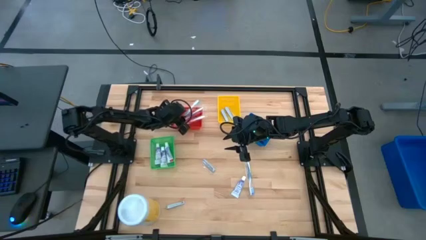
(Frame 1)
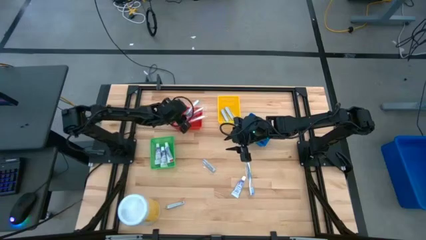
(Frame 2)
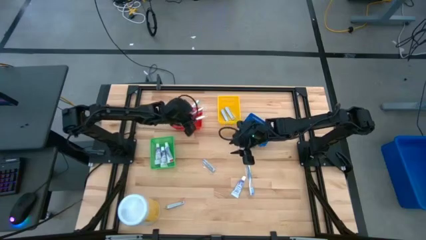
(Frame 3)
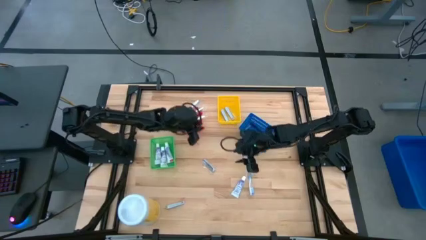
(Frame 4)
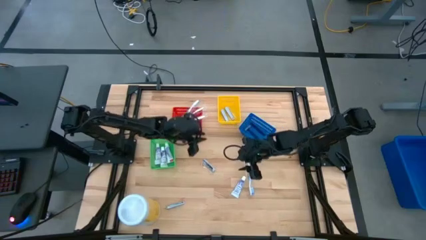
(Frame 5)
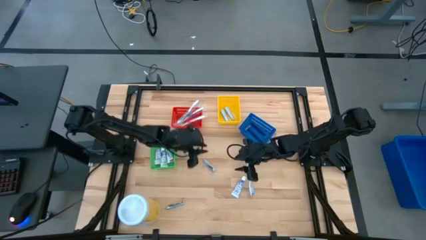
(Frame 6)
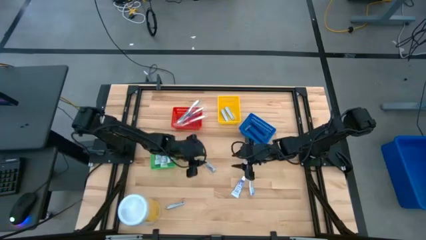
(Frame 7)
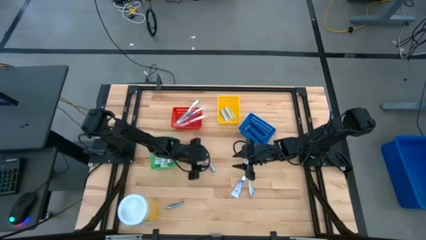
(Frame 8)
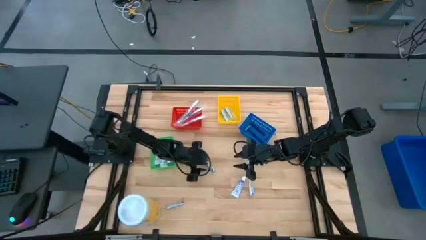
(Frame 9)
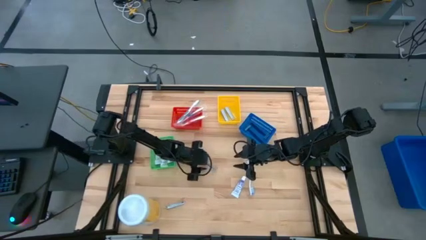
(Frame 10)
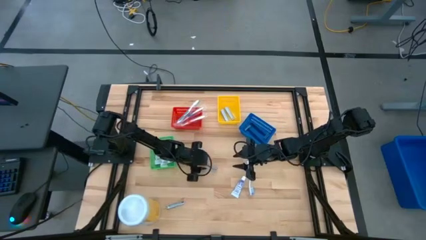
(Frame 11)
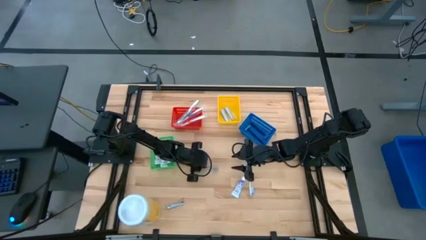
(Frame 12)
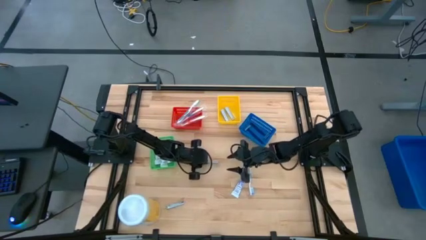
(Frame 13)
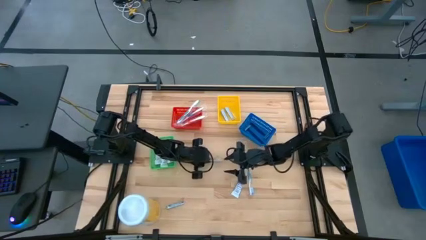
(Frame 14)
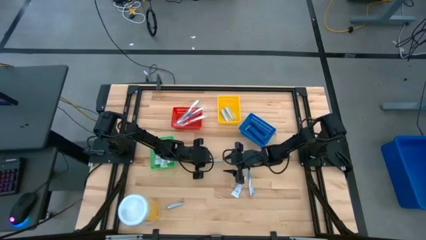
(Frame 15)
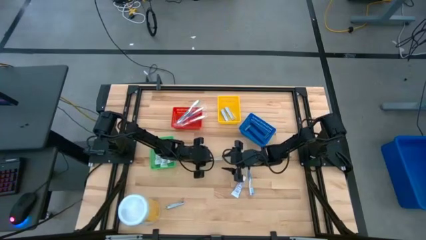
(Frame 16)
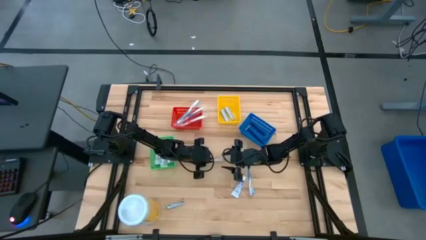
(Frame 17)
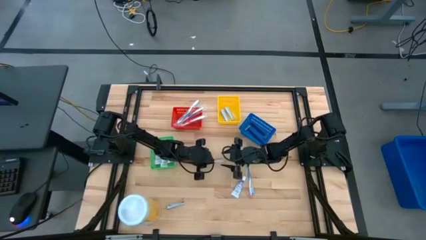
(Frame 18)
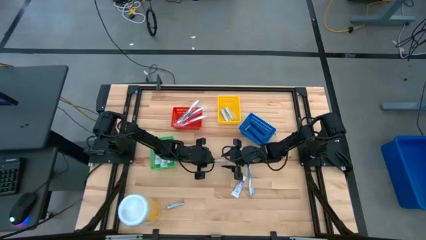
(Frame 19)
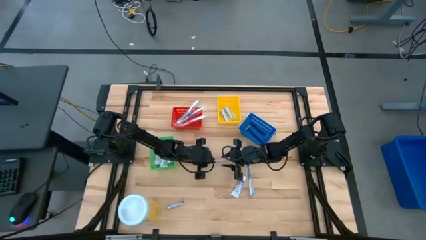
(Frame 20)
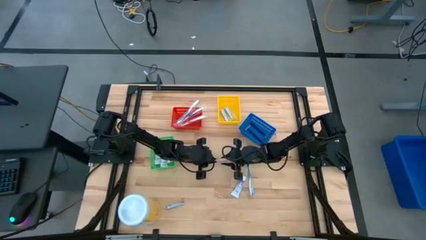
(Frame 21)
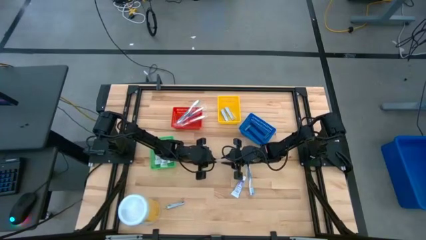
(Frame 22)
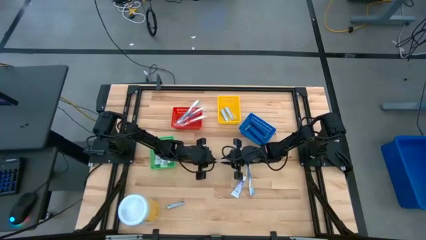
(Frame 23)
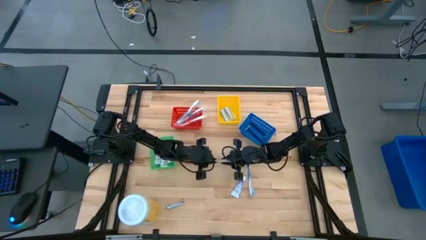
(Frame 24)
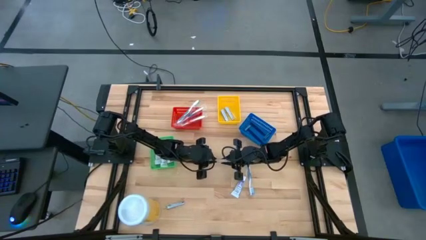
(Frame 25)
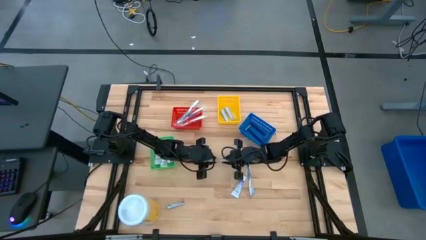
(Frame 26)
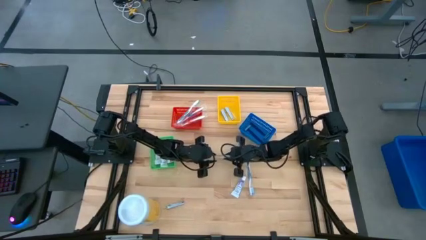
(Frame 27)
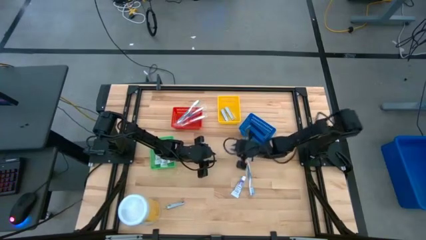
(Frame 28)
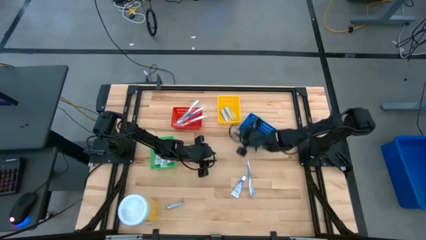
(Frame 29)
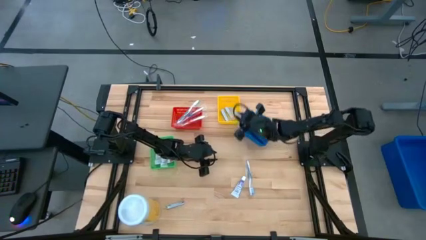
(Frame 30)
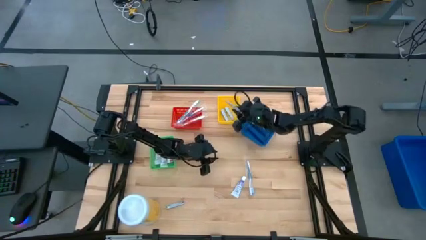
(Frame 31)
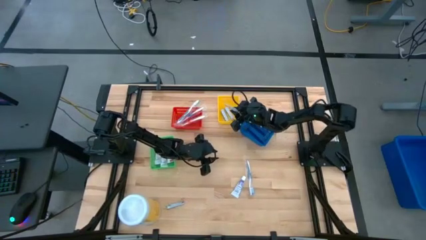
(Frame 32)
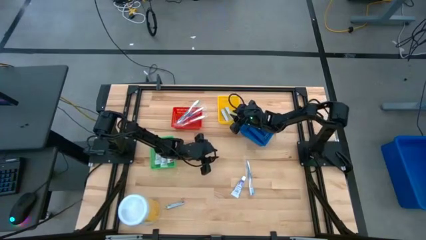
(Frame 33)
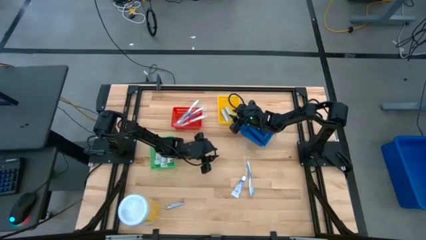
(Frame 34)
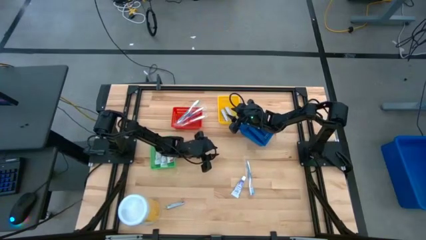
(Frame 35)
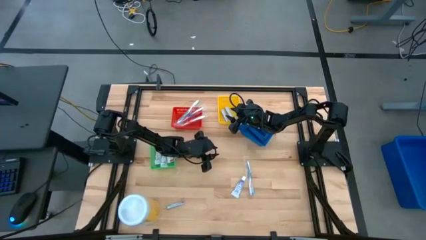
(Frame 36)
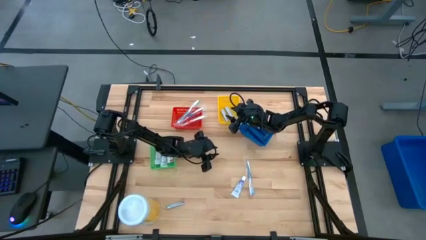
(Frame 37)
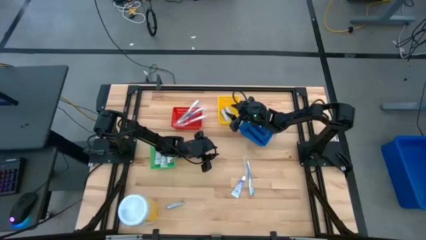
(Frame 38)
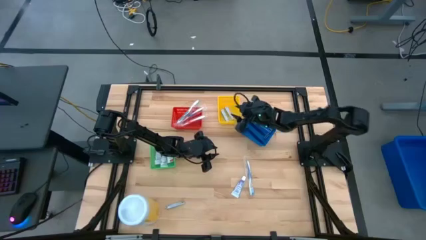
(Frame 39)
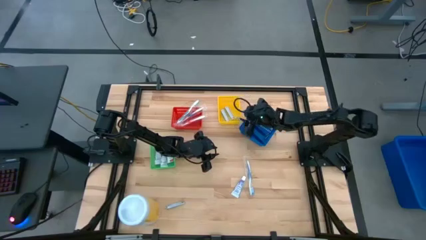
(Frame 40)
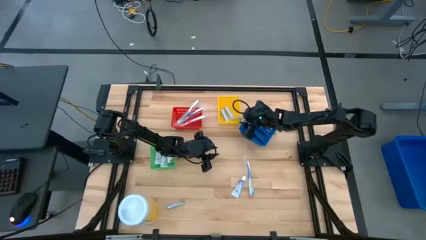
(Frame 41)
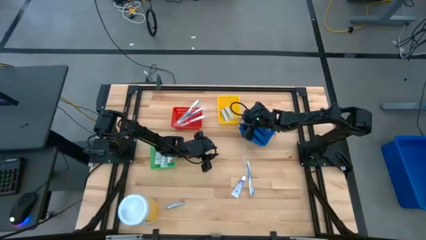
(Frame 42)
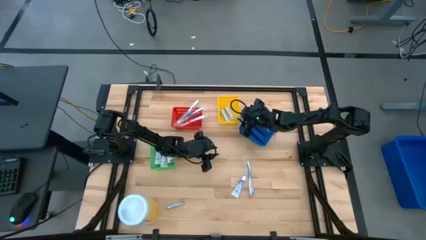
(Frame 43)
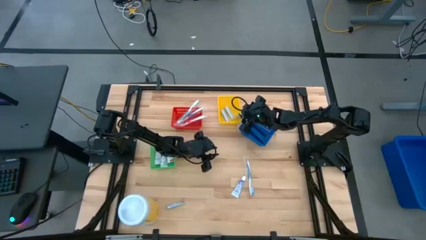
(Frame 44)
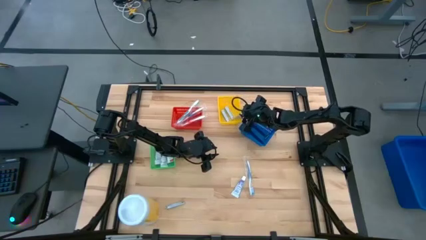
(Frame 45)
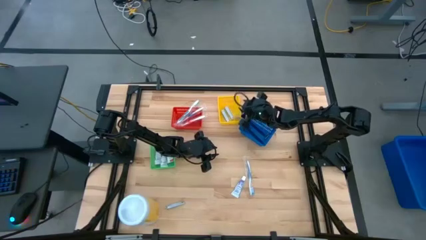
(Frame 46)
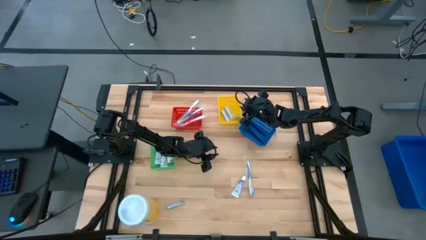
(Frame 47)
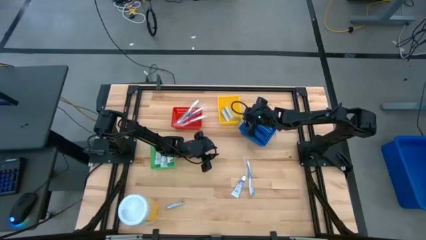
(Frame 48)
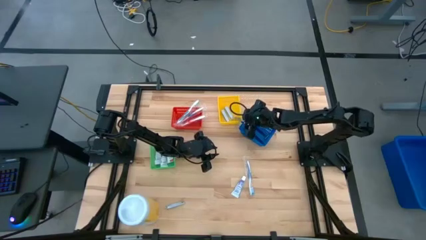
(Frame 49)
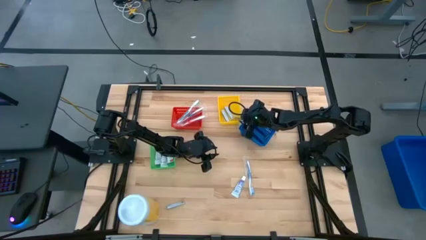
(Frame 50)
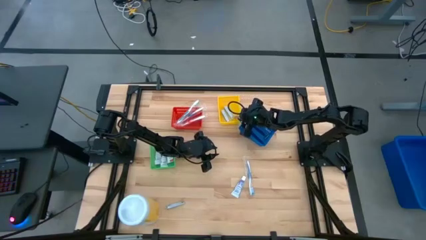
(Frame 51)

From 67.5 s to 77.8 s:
Task: Pick & Place Travel size toiletries
Put the silver nail cutter into the yellow bin

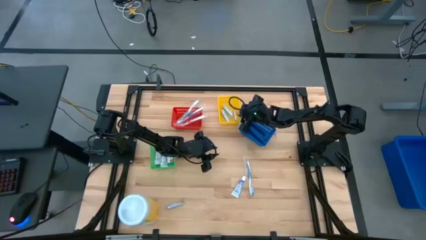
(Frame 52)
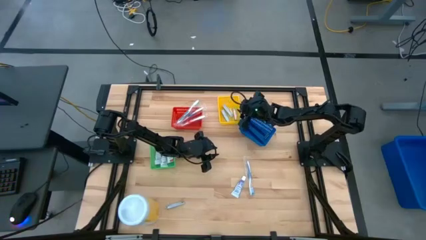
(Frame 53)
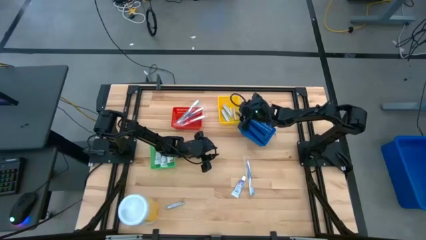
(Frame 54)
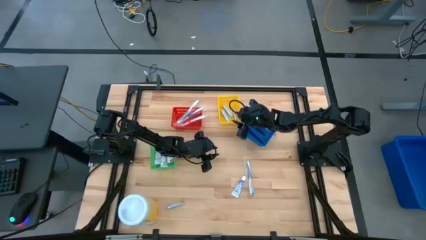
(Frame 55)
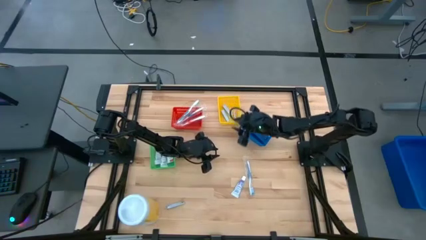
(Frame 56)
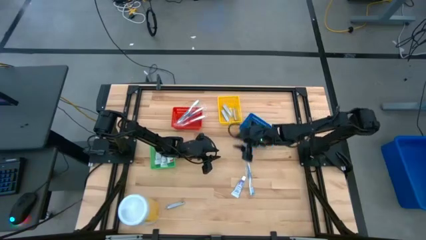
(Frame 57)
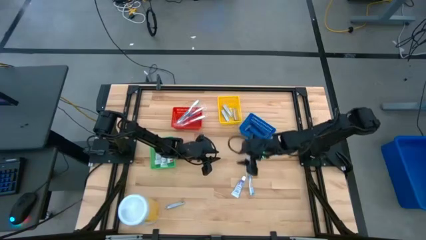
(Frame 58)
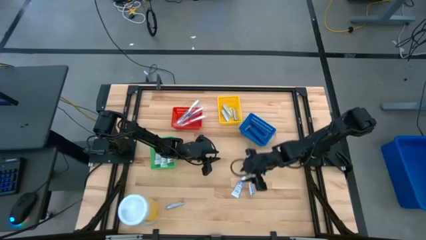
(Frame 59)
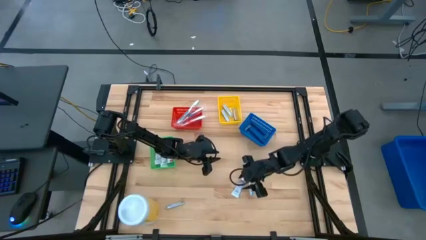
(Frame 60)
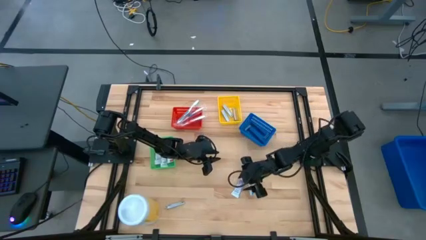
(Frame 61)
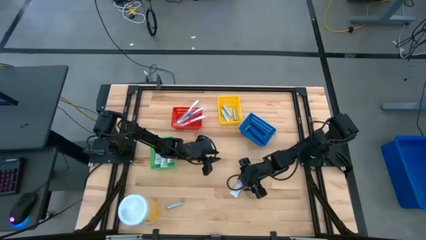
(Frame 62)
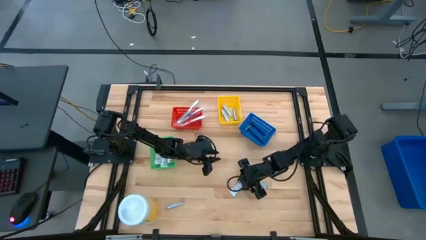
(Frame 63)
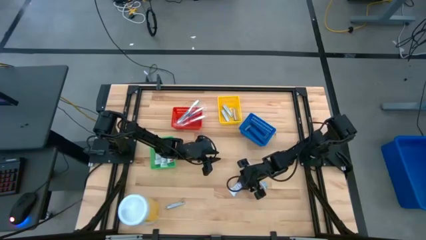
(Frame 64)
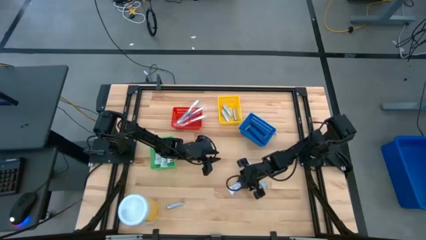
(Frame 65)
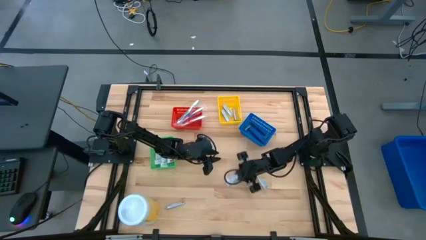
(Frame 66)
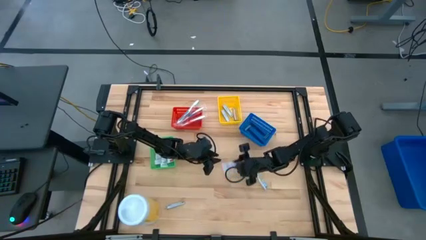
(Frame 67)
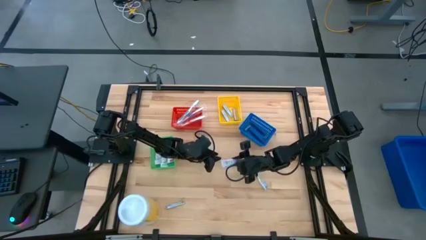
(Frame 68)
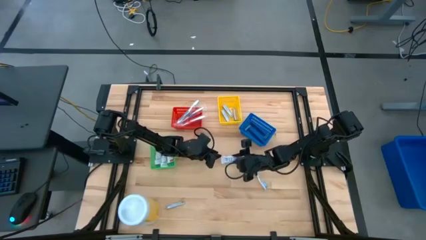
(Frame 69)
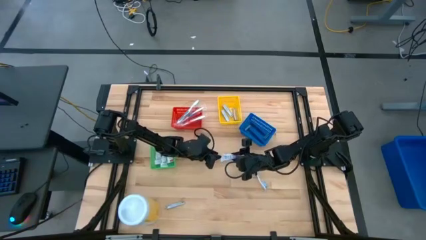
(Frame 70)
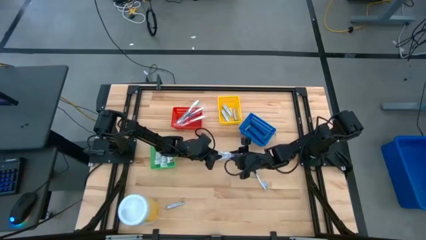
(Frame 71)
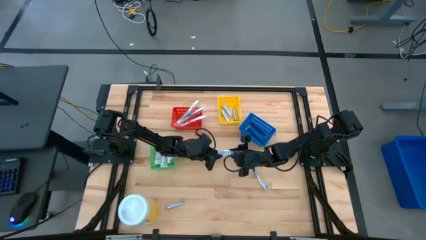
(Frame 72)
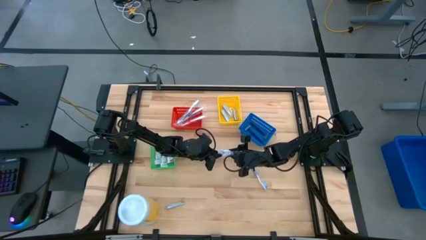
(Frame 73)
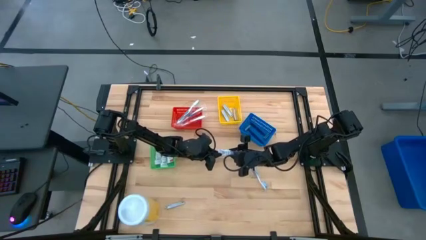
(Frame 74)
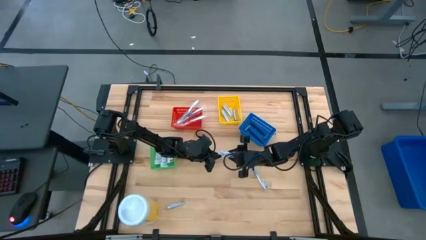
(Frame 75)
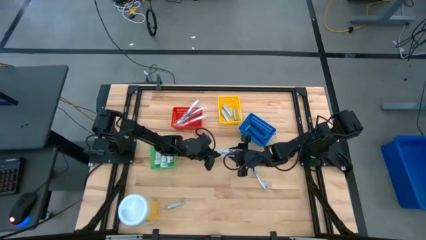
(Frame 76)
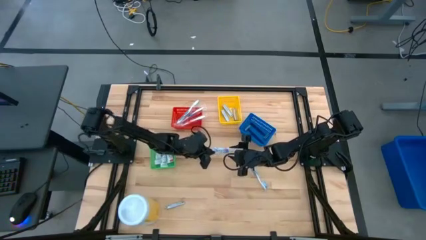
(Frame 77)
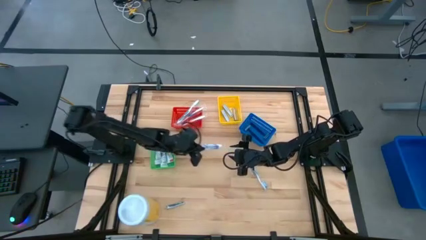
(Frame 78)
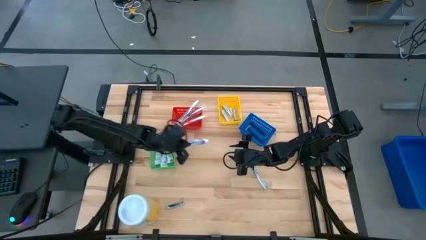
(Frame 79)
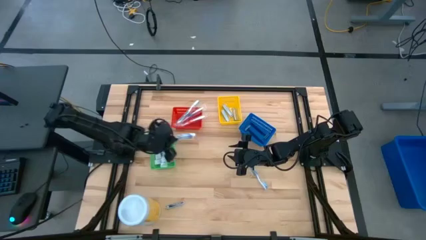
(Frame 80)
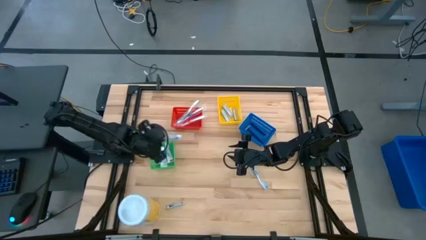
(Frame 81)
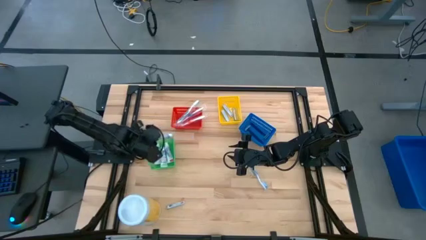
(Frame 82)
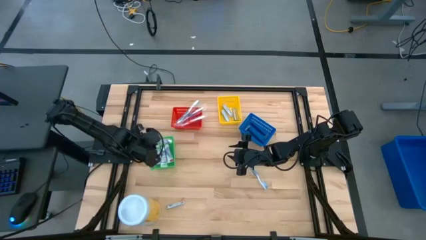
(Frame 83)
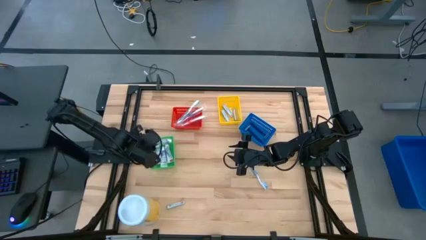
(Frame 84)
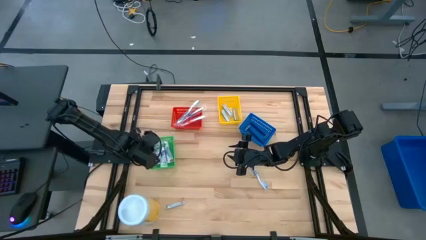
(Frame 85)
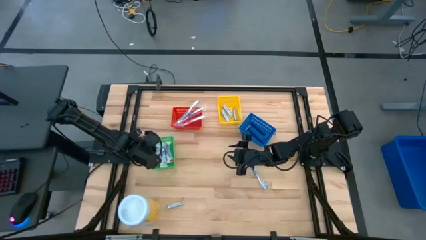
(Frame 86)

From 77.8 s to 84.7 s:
Put the white toothpaste into the green bin
